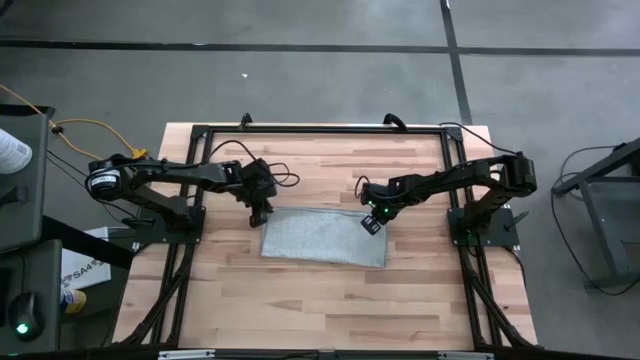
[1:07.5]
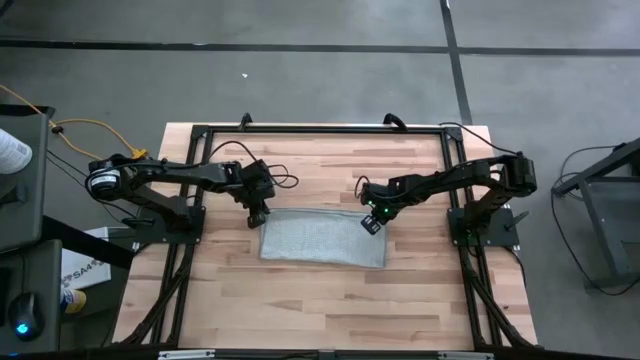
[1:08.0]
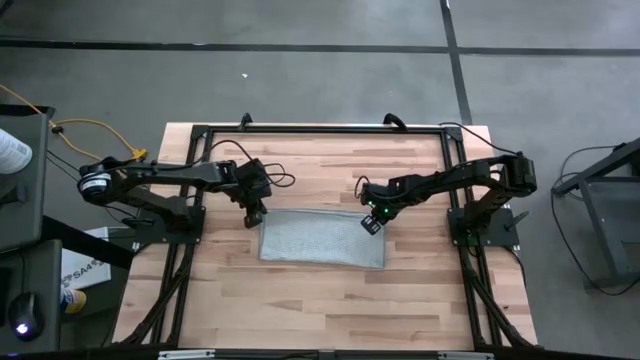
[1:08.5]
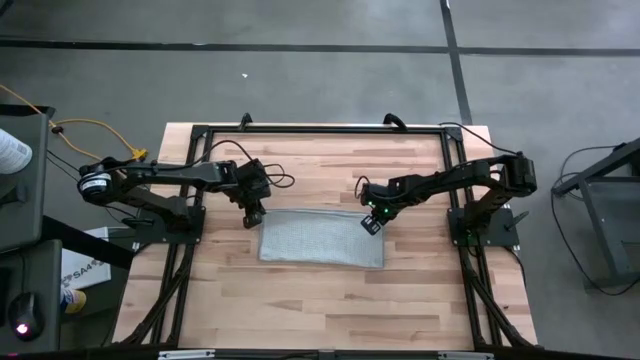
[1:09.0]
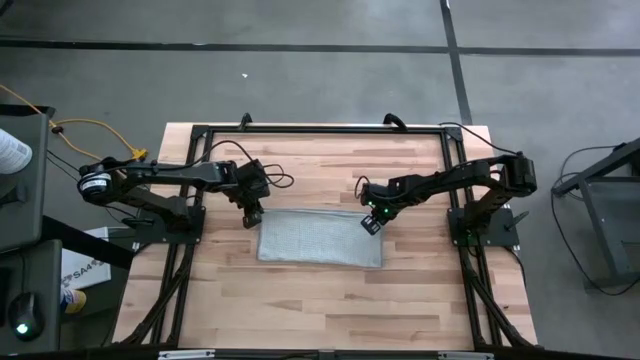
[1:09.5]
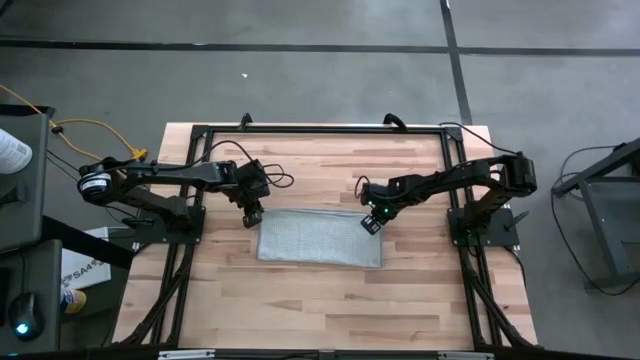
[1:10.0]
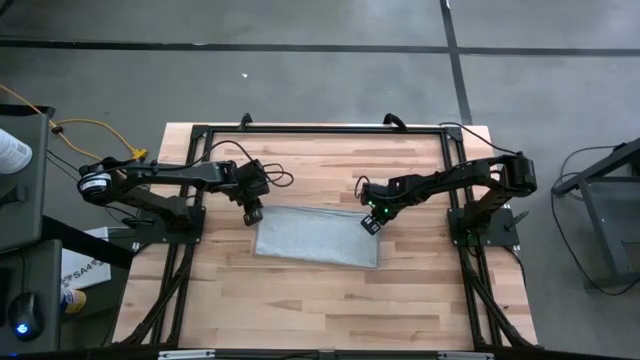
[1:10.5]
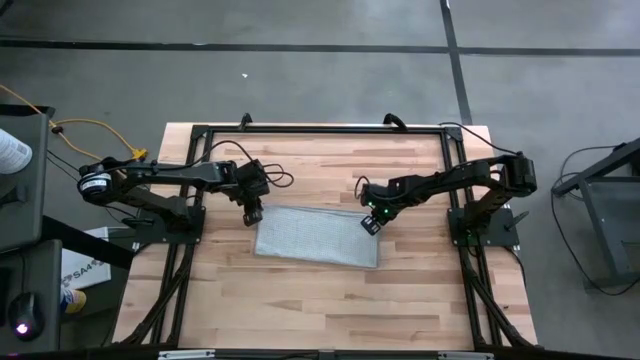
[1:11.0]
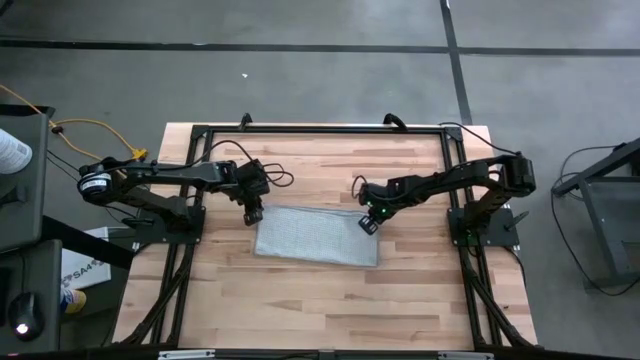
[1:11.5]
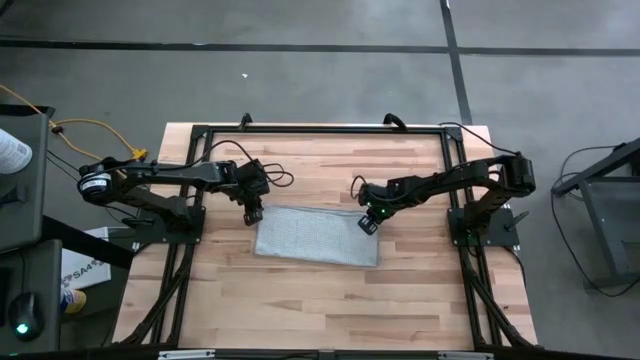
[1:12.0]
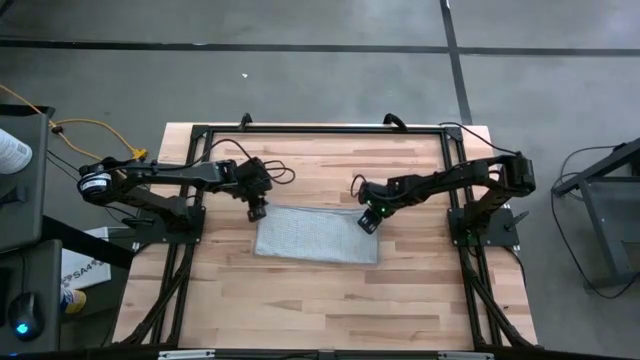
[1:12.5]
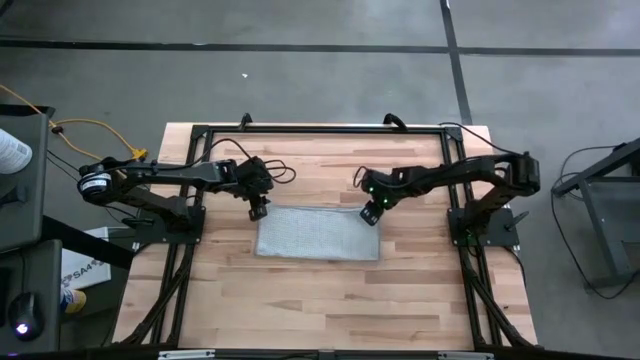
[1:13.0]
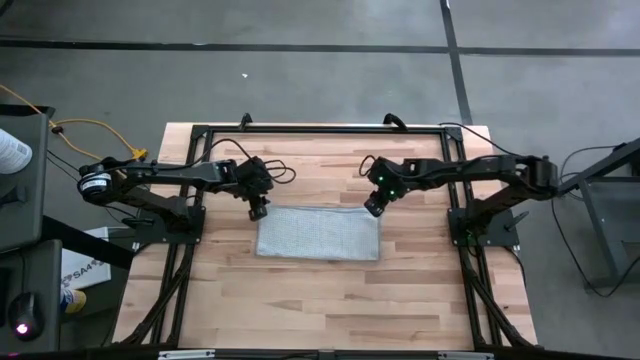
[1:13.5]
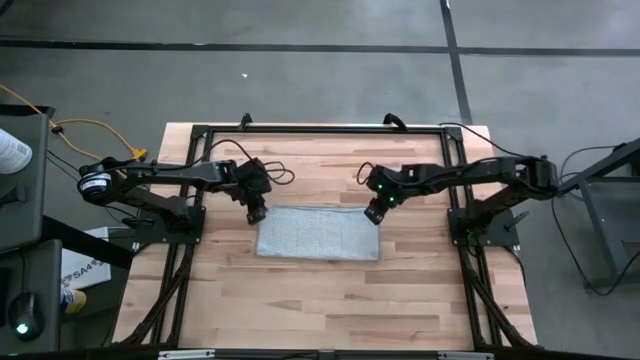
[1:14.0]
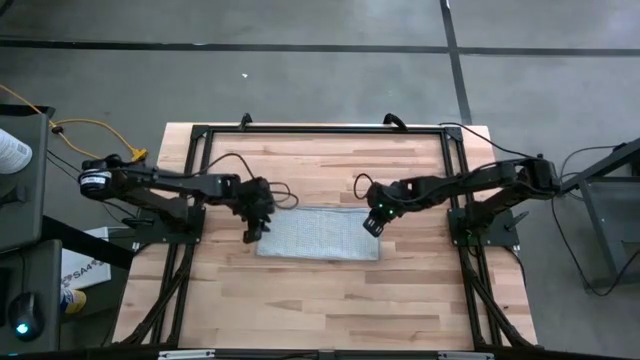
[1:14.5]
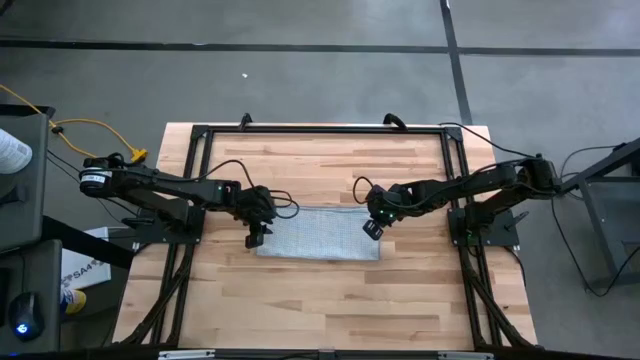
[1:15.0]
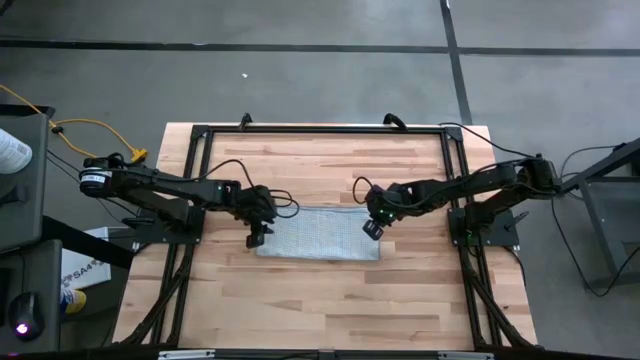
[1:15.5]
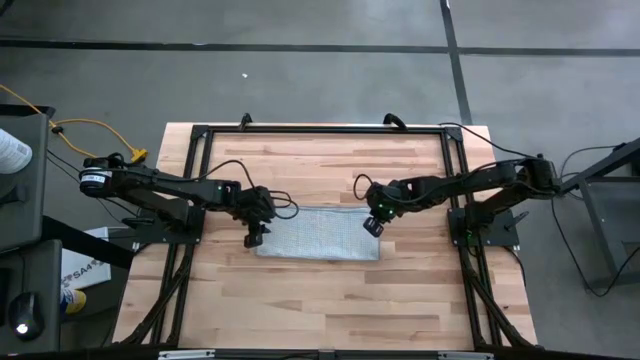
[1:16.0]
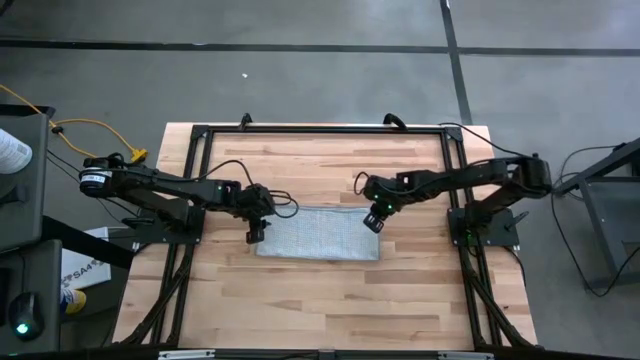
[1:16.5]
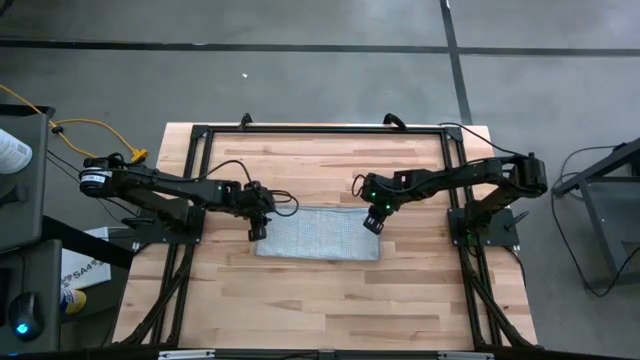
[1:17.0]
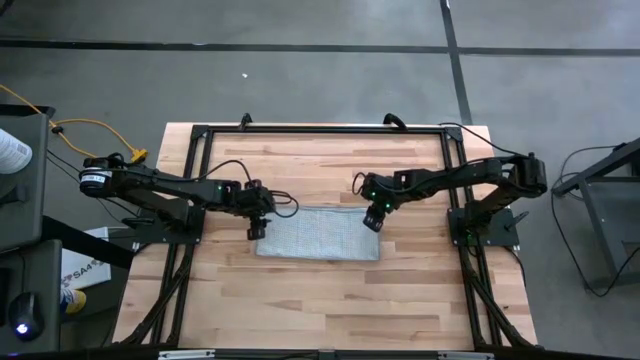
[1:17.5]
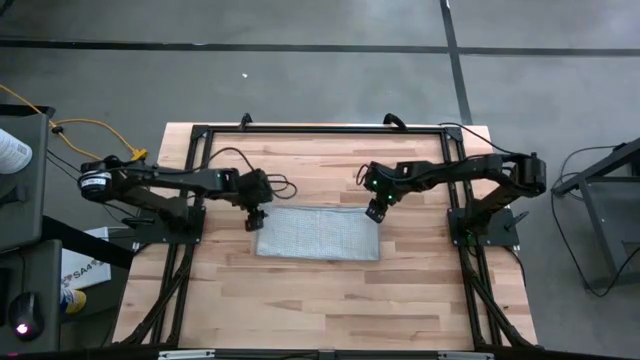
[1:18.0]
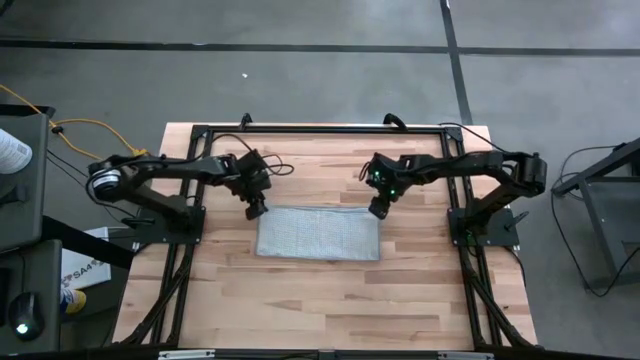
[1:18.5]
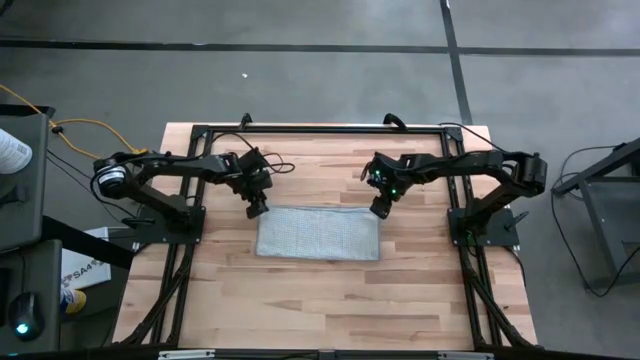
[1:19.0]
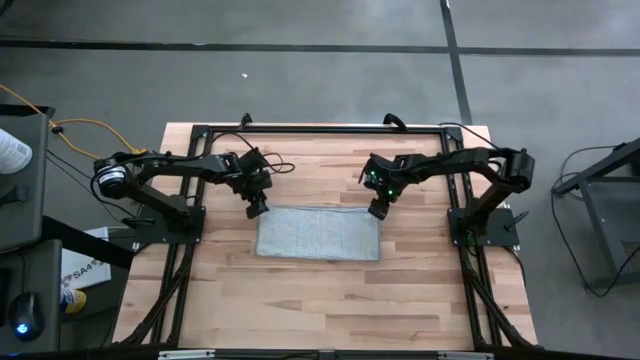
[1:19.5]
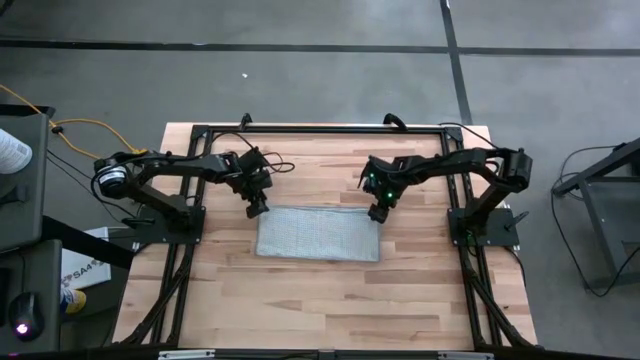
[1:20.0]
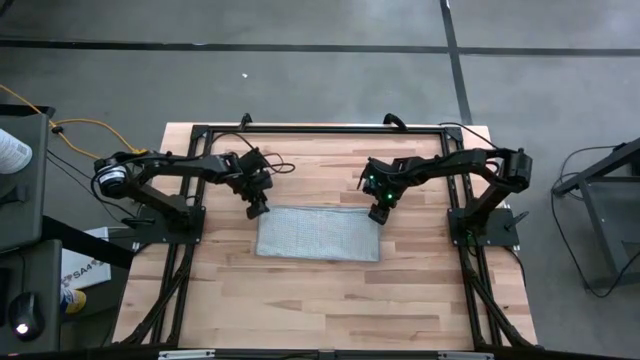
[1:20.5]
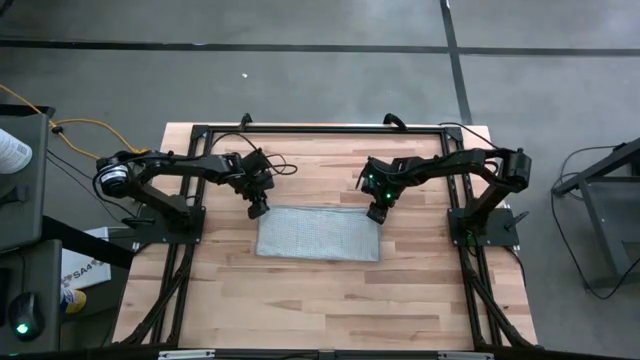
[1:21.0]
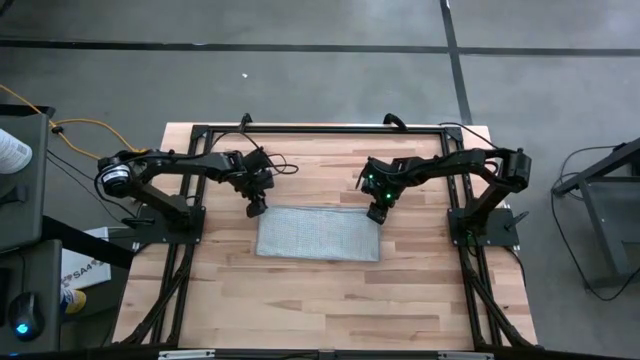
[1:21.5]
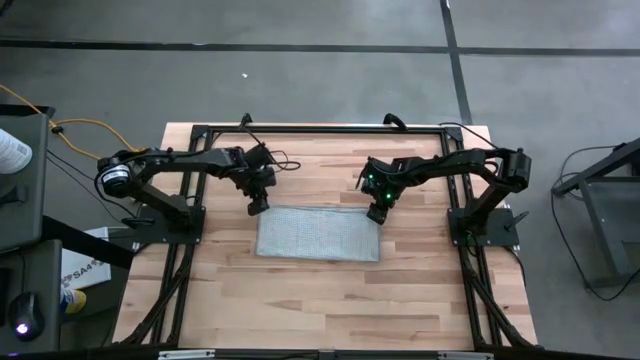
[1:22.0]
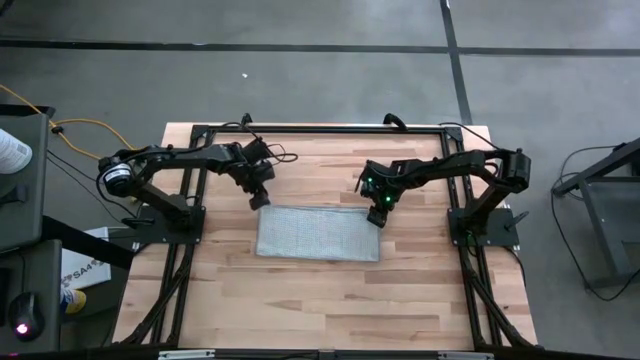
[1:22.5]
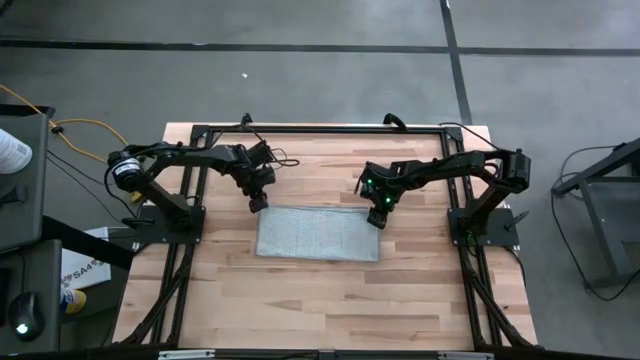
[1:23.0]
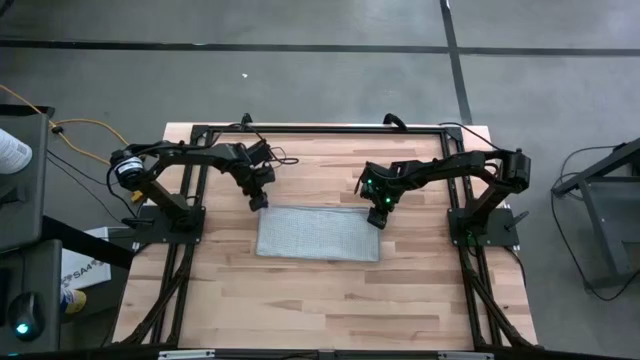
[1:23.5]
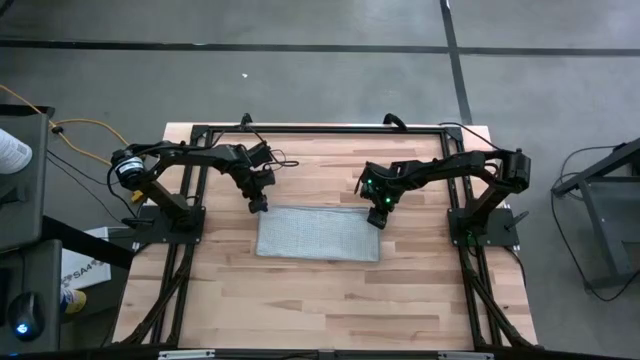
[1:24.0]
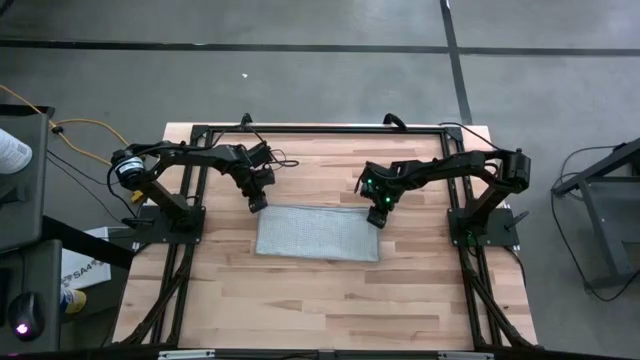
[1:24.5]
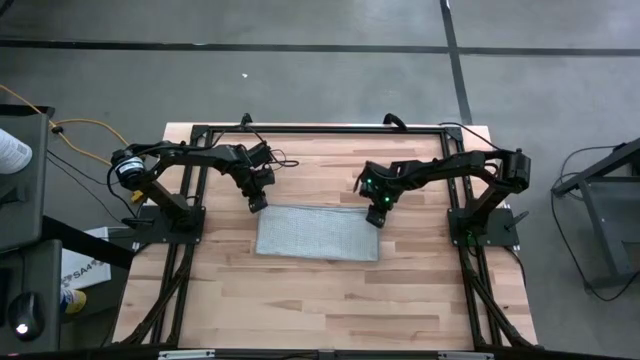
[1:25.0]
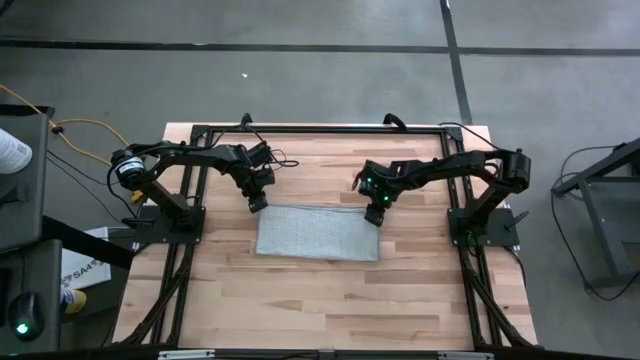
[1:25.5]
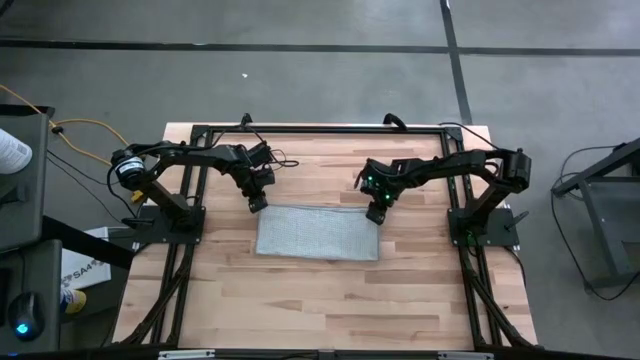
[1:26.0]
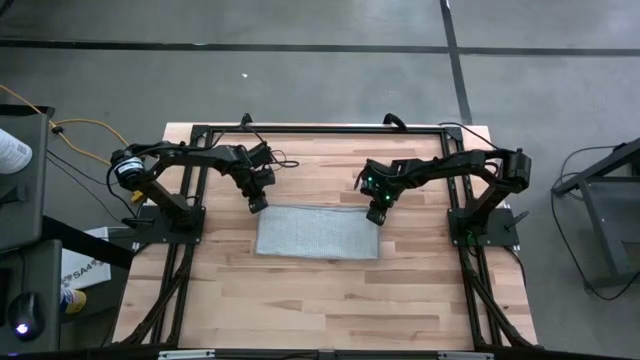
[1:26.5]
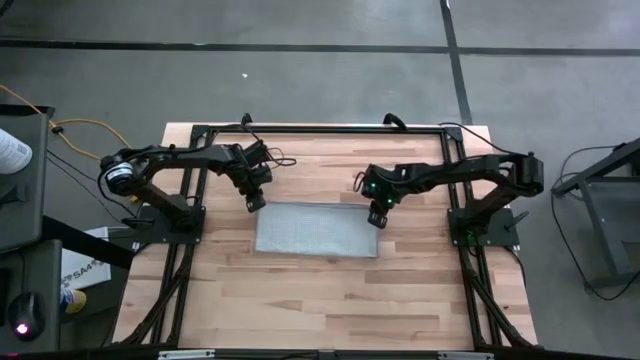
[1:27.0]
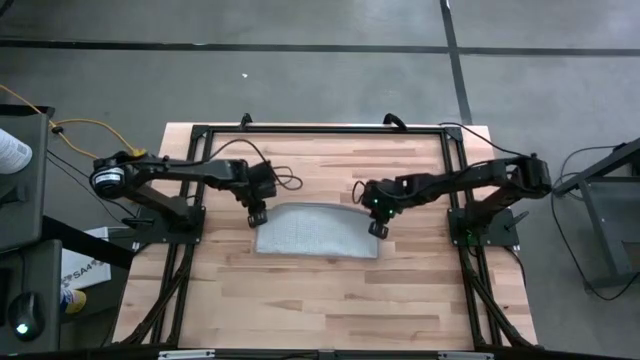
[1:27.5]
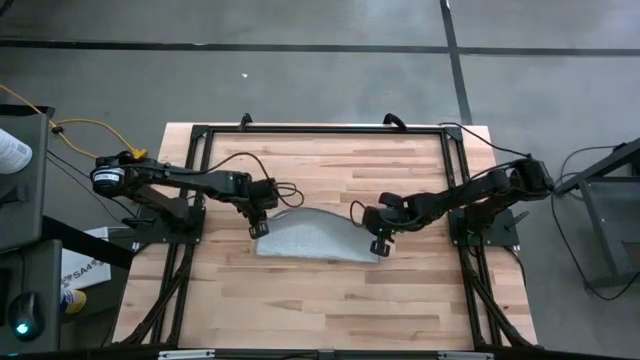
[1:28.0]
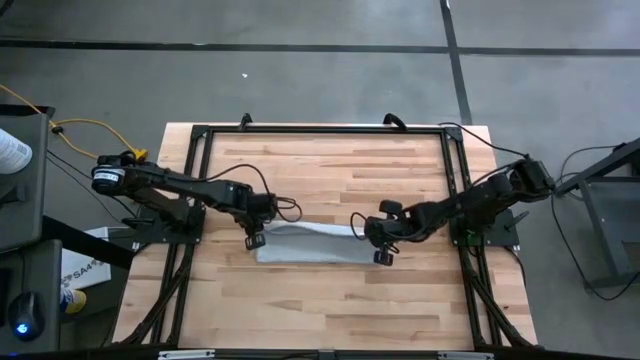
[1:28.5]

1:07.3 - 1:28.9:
Task: Fold microfiber towels
Fold the gray towel
